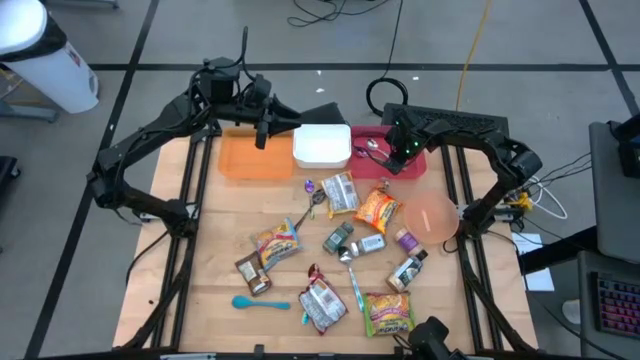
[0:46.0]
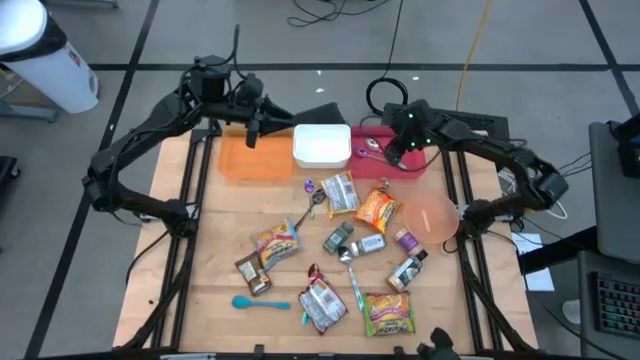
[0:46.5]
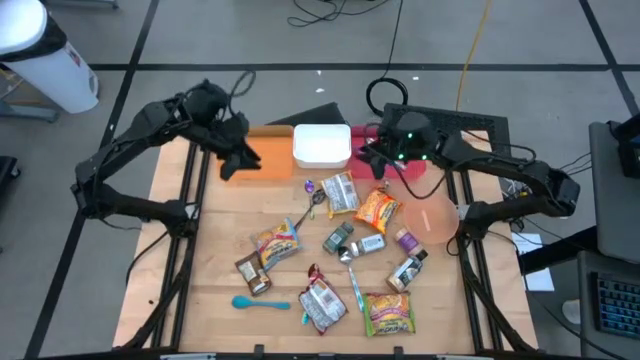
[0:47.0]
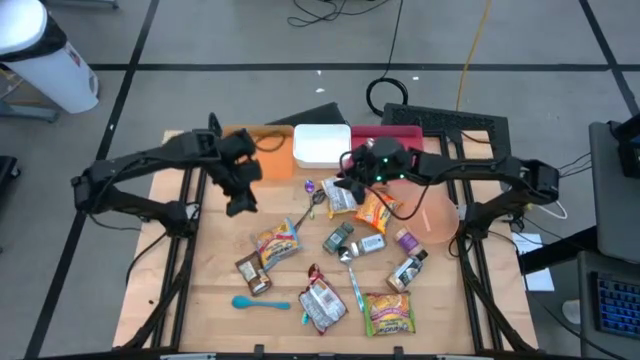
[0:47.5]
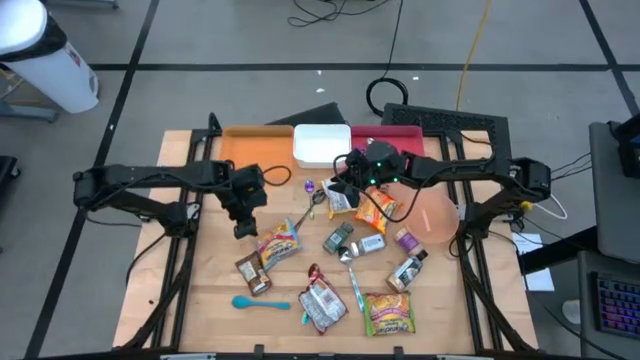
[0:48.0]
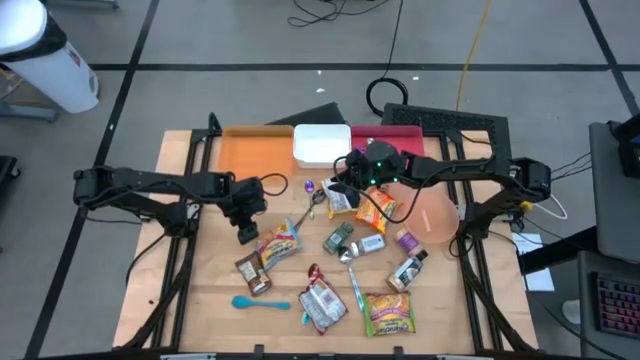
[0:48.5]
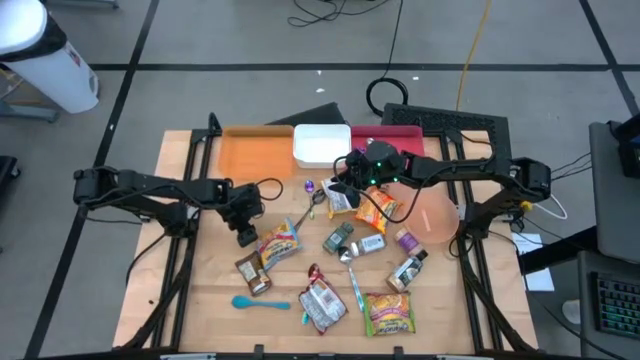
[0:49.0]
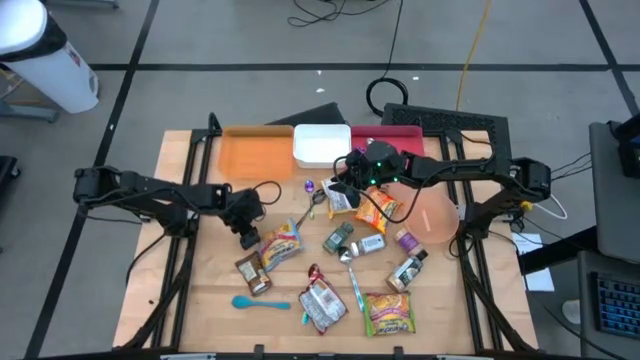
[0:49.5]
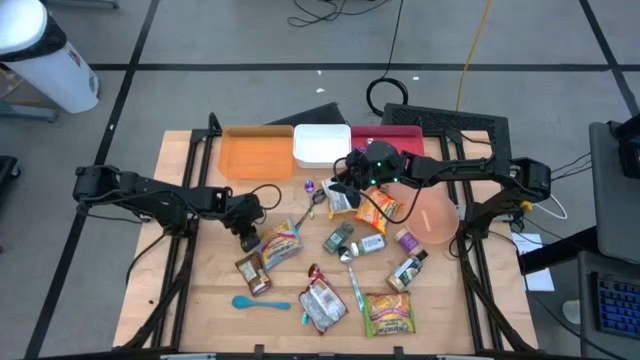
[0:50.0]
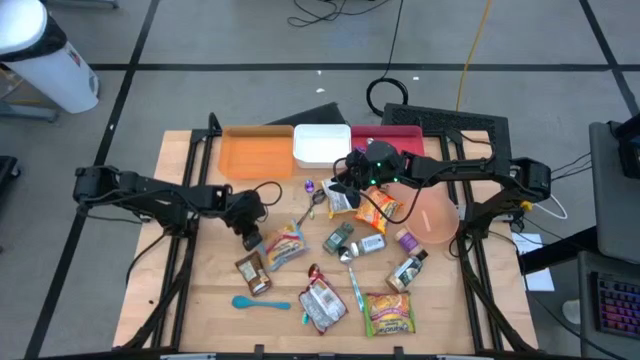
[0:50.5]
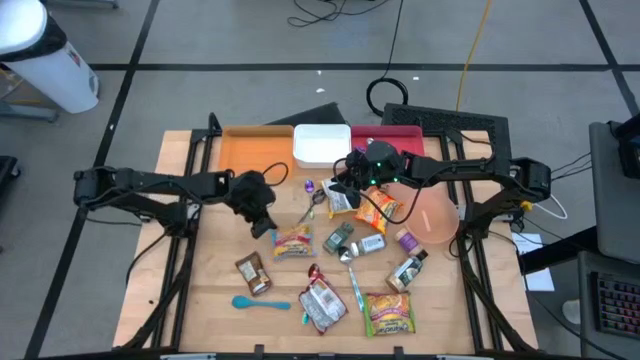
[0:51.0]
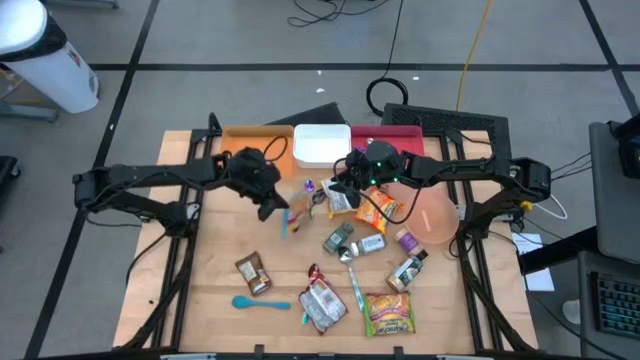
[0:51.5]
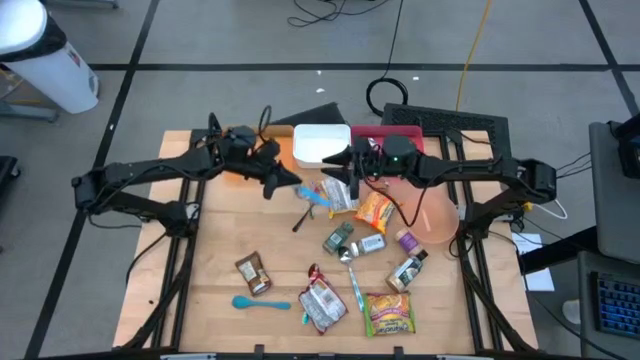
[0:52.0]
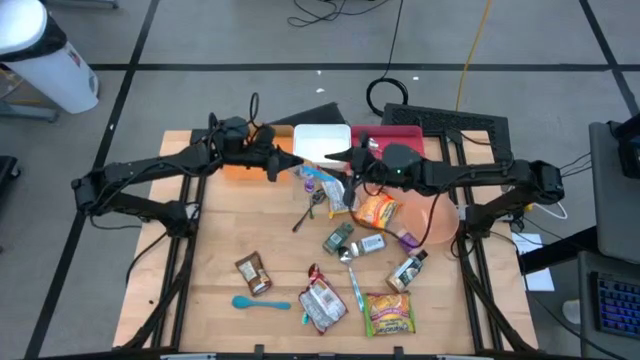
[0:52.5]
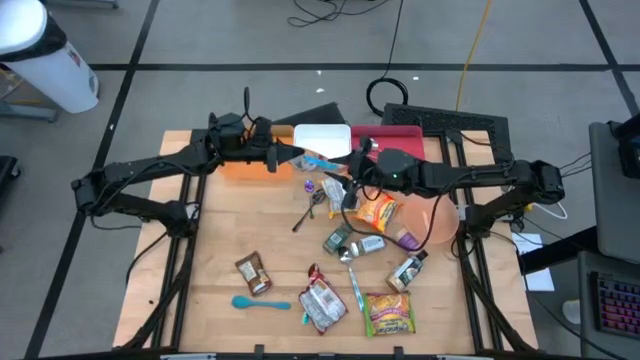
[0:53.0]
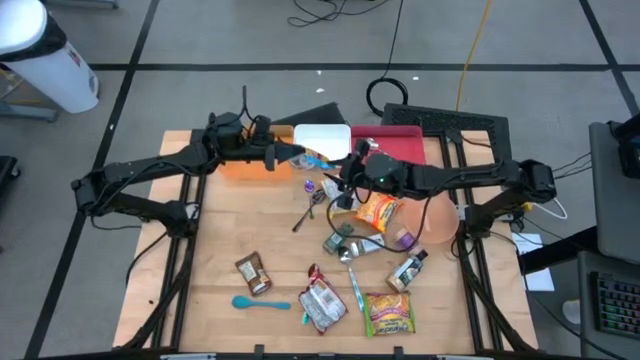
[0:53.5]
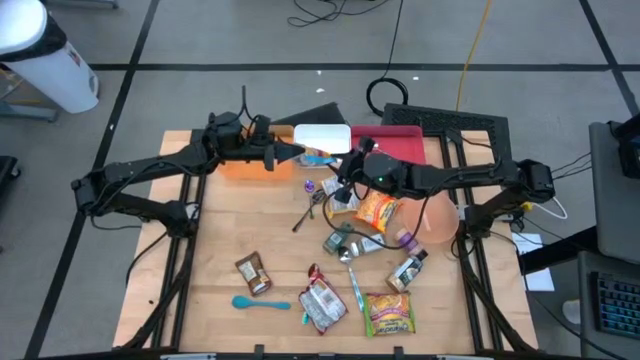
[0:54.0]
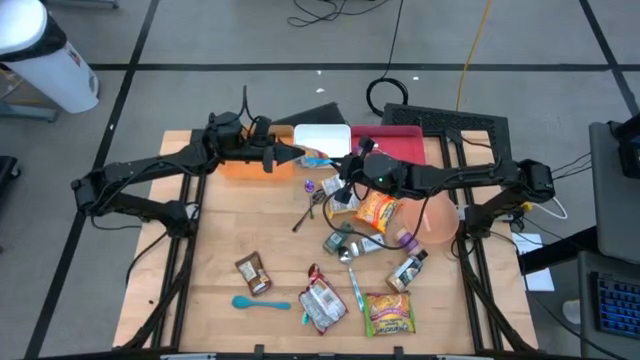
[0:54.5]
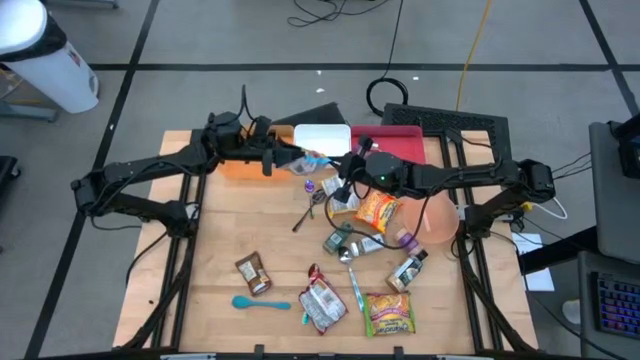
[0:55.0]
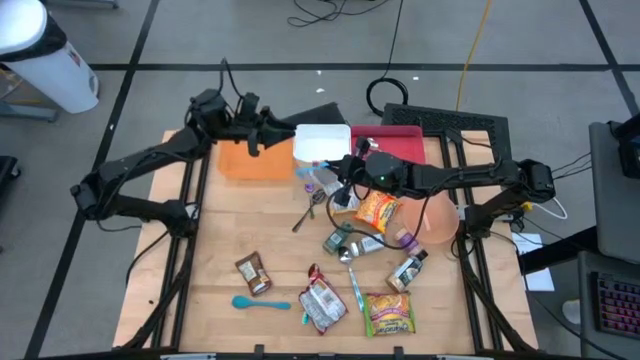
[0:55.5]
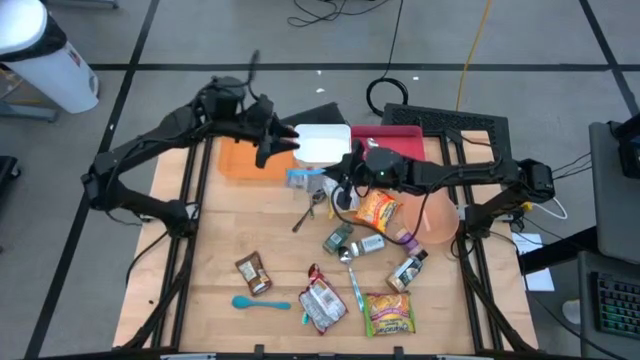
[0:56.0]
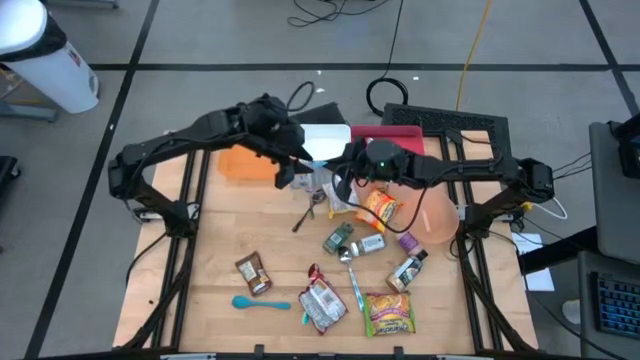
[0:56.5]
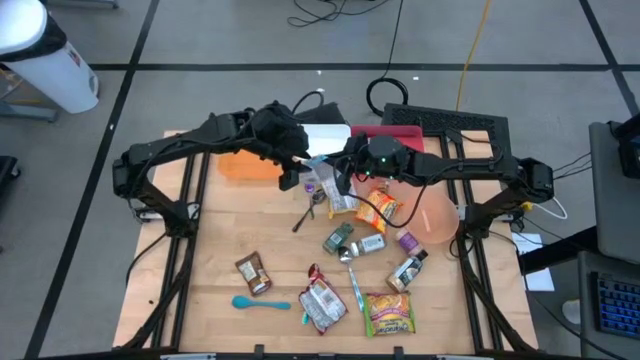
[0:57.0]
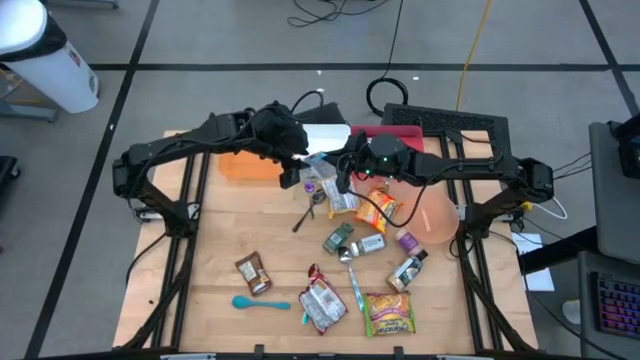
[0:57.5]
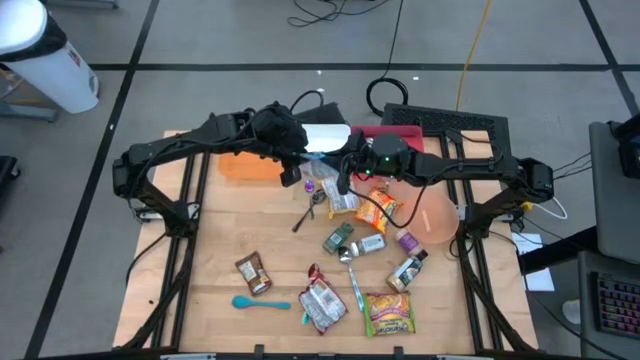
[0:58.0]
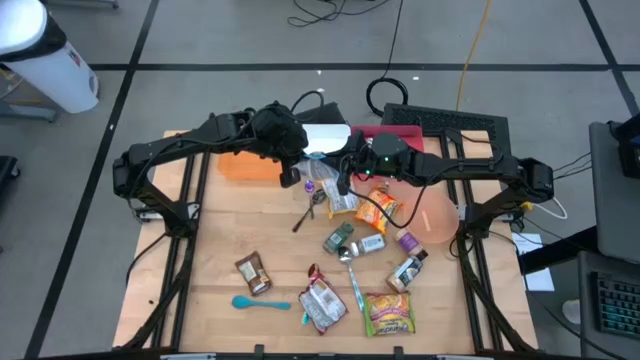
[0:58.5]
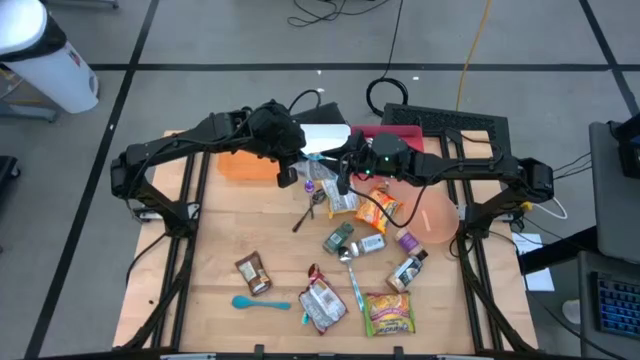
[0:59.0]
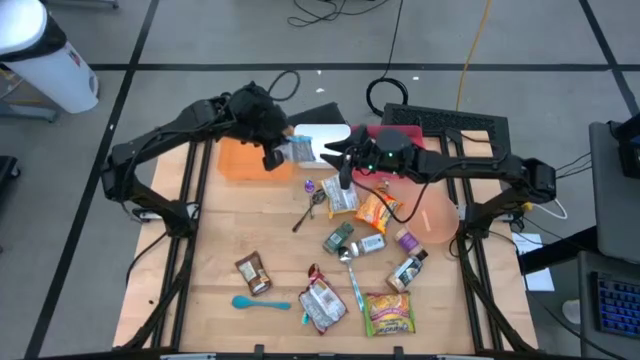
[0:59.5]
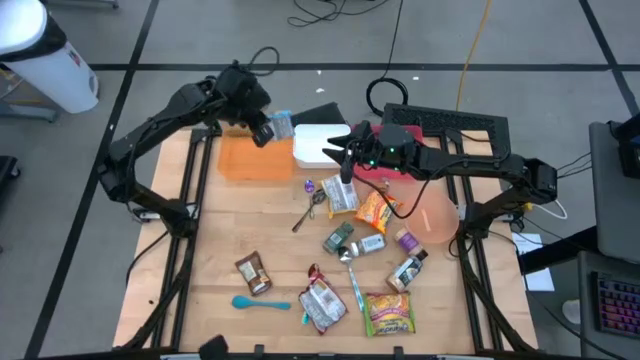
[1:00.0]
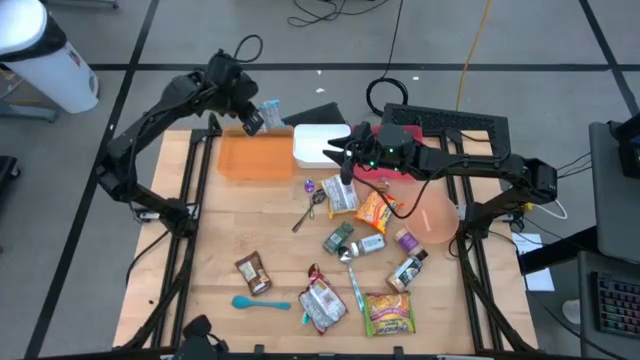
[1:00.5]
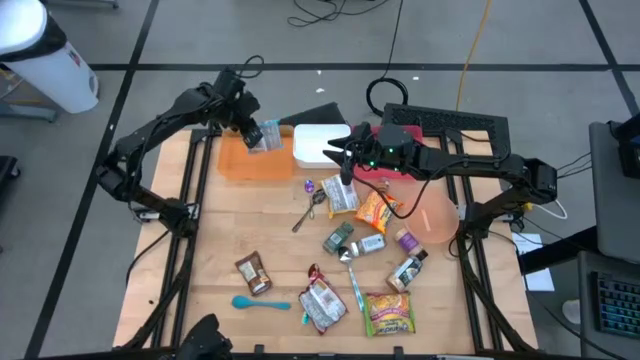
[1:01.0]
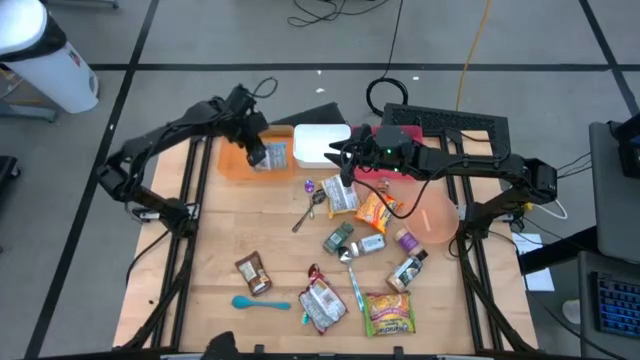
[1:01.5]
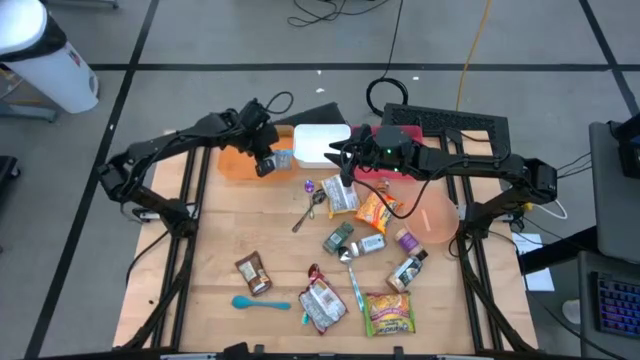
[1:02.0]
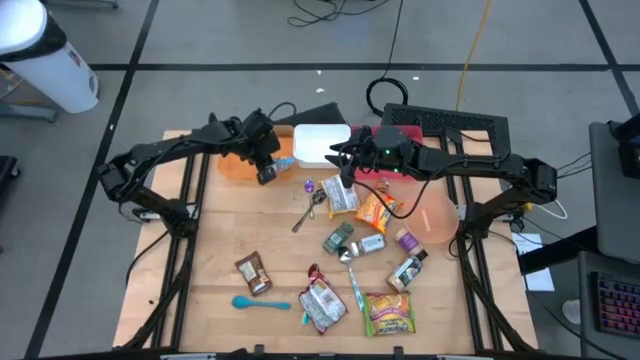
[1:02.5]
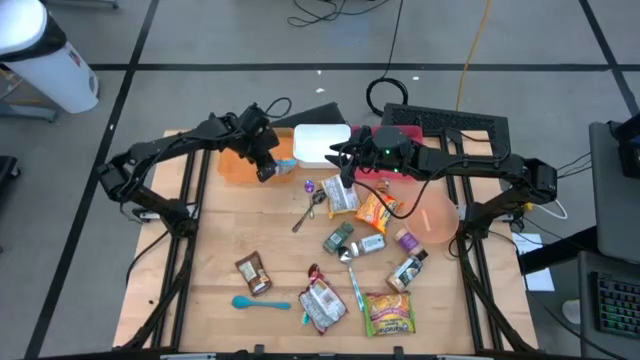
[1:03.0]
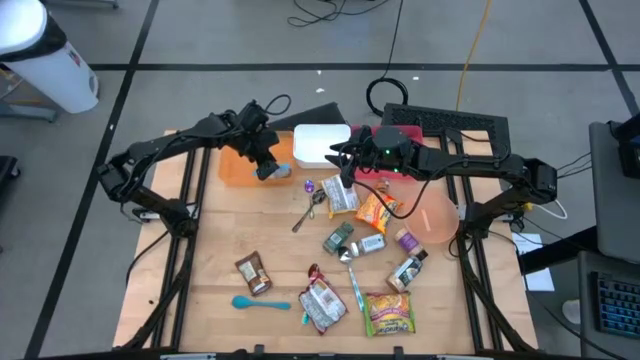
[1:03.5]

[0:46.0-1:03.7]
Task: Pick & Place Food Item
Put the light blue noodle pack into the orange bin
